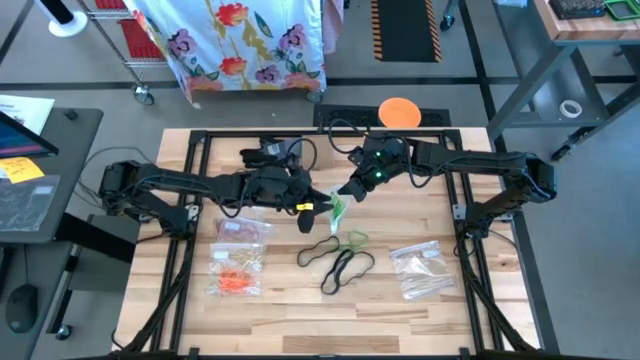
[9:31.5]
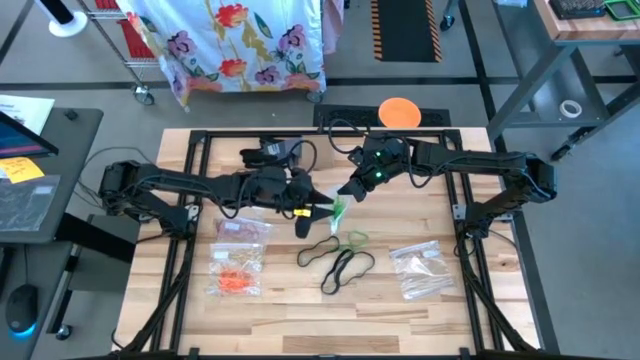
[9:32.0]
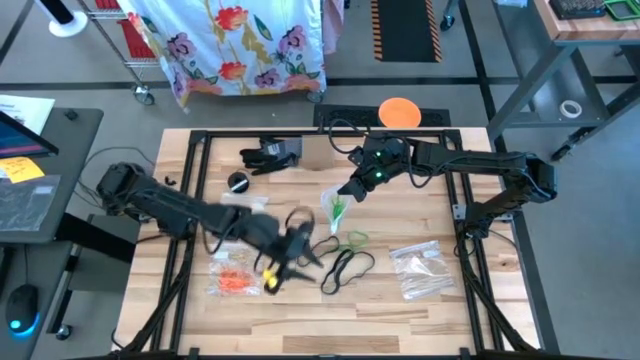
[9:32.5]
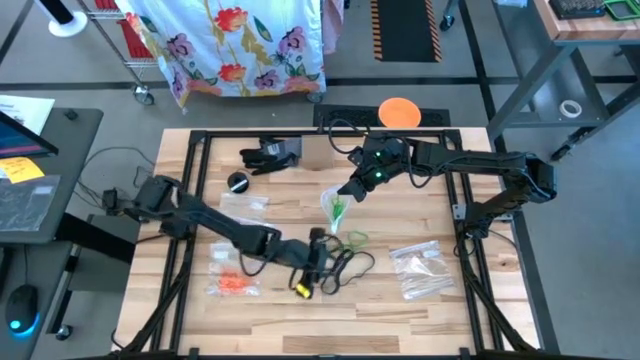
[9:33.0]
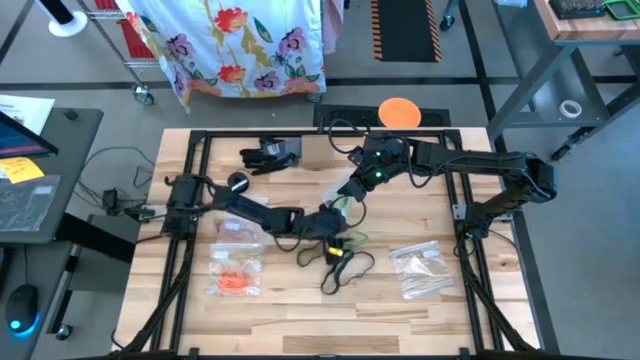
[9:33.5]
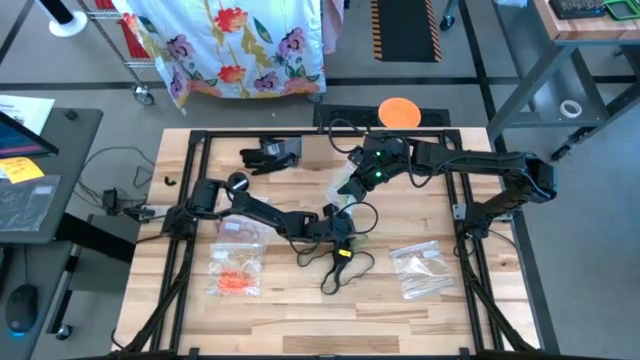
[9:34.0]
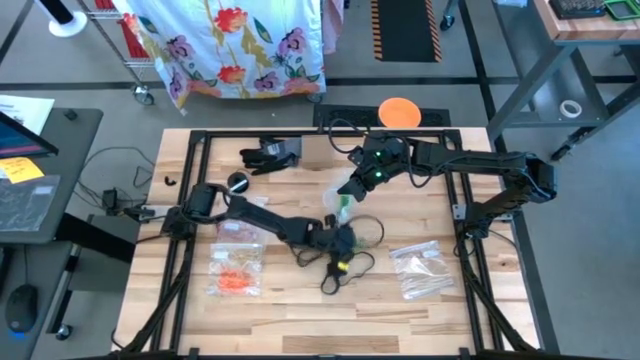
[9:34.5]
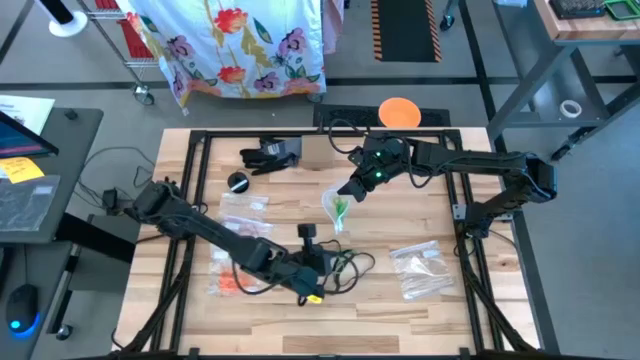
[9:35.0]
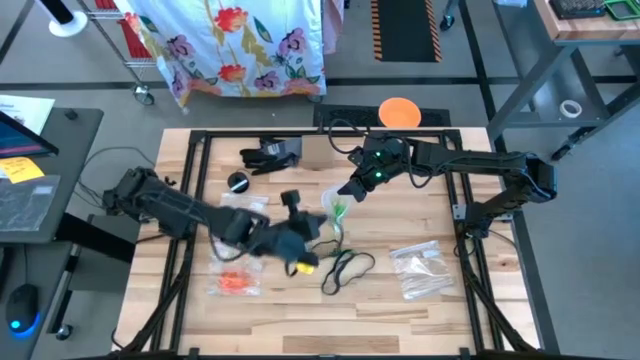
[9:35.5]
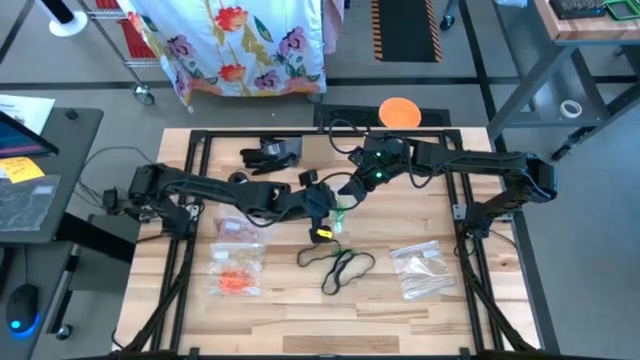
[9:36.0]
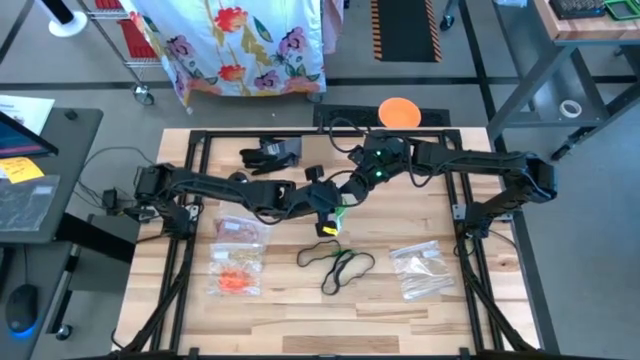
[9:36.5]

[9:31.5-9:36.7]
Task: Sort rubber bands
Put the green rubber band into the transparent zip bag

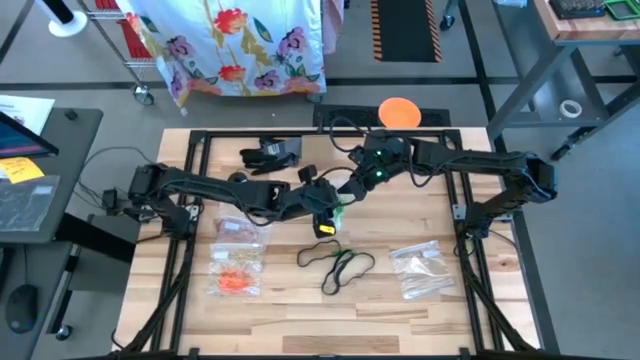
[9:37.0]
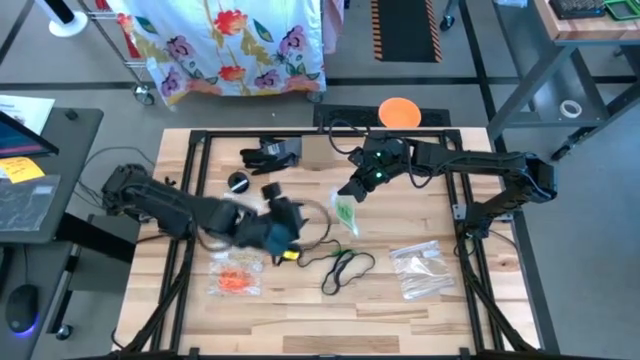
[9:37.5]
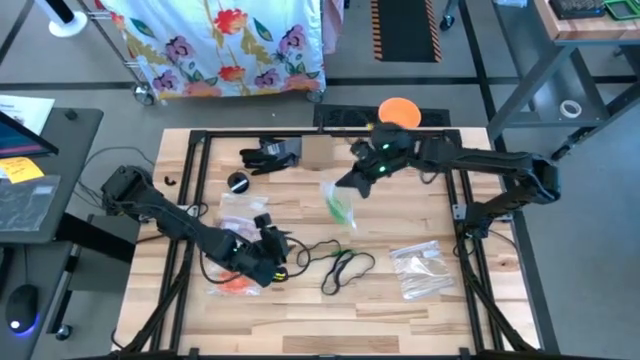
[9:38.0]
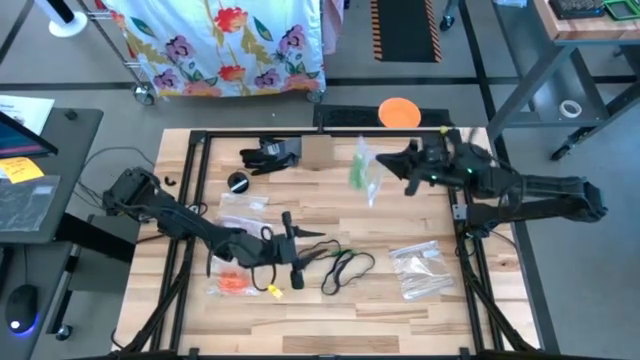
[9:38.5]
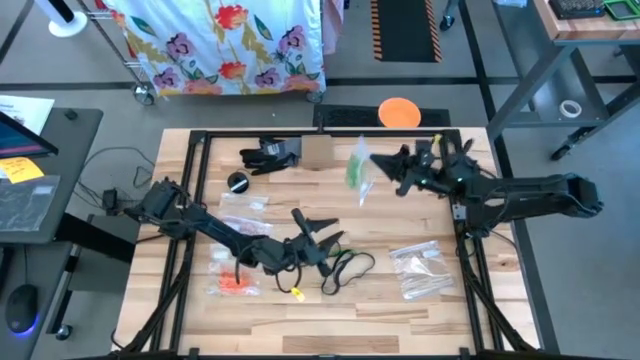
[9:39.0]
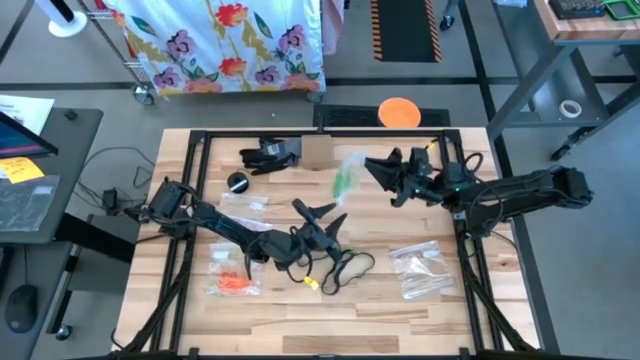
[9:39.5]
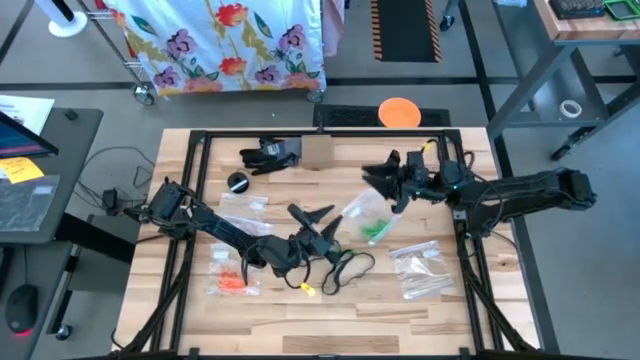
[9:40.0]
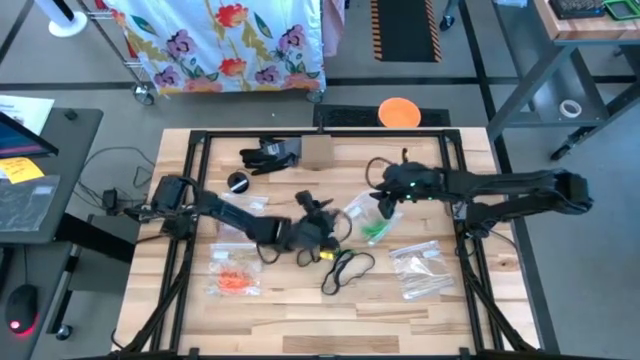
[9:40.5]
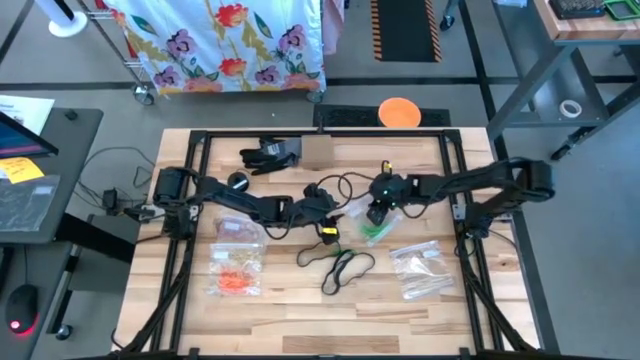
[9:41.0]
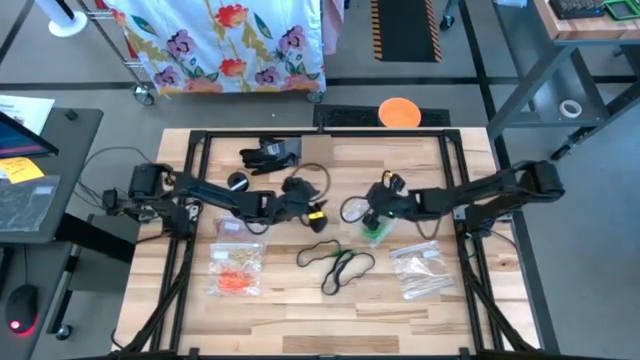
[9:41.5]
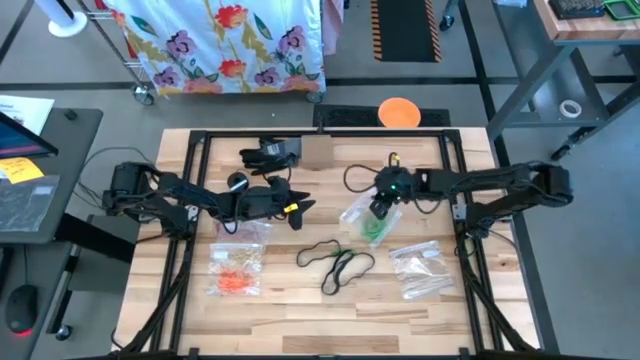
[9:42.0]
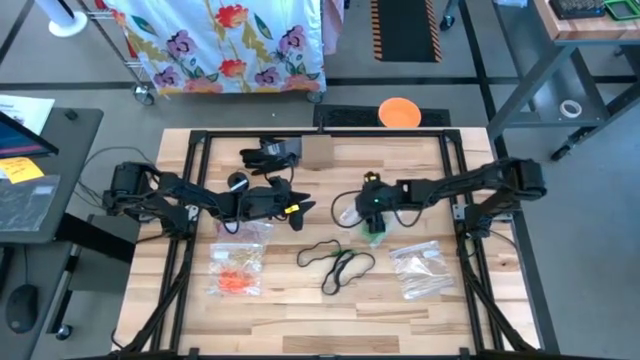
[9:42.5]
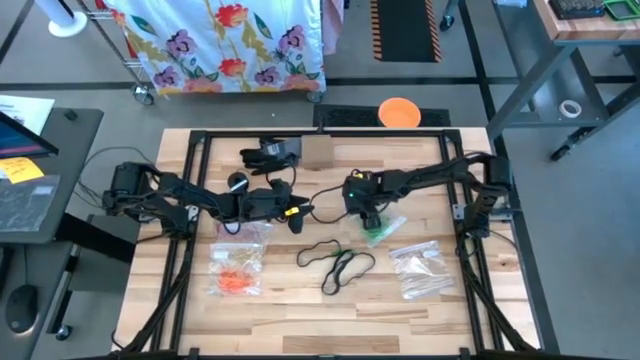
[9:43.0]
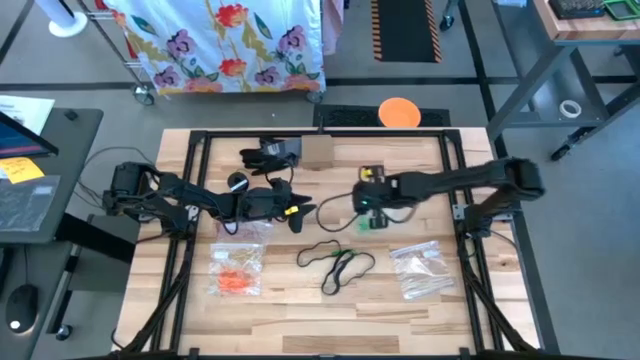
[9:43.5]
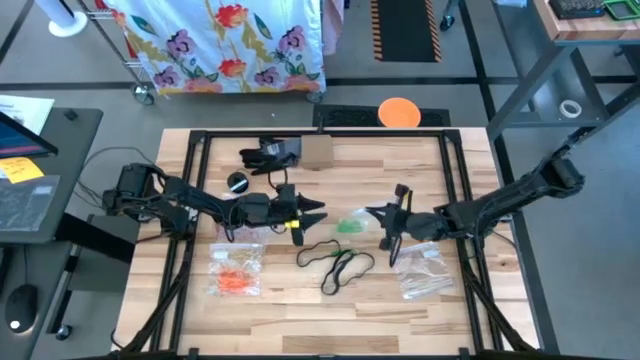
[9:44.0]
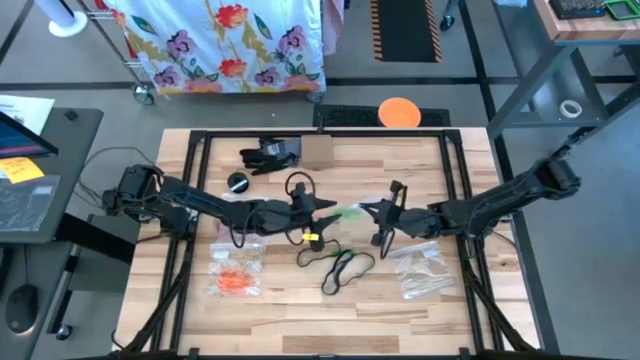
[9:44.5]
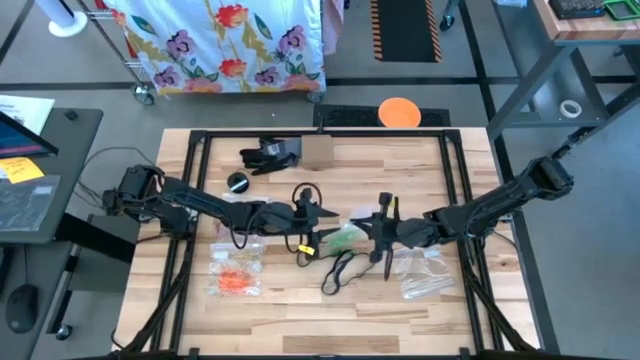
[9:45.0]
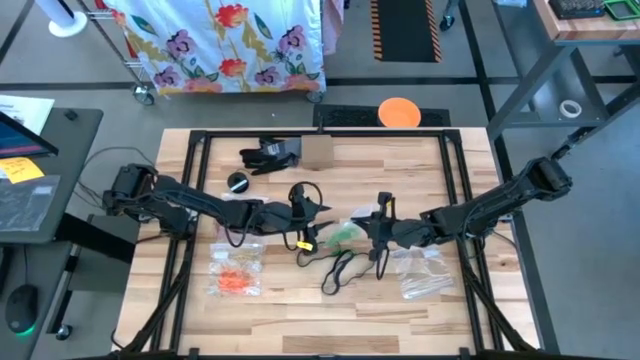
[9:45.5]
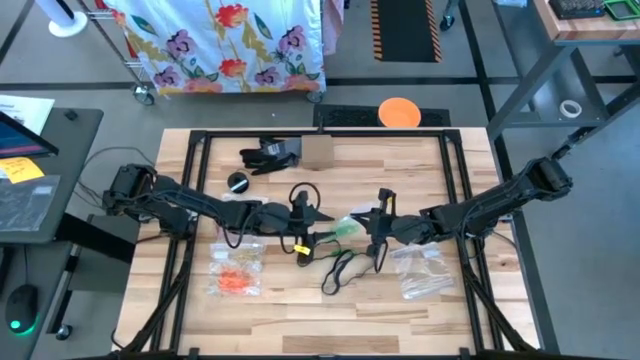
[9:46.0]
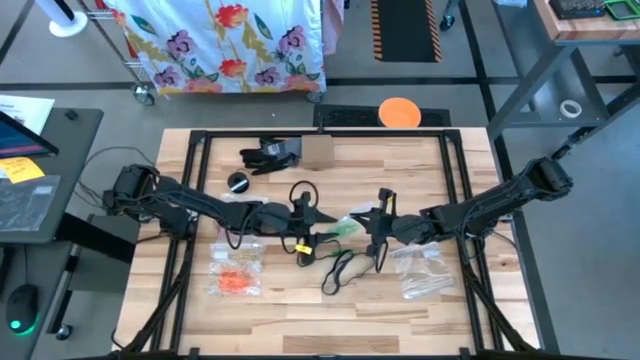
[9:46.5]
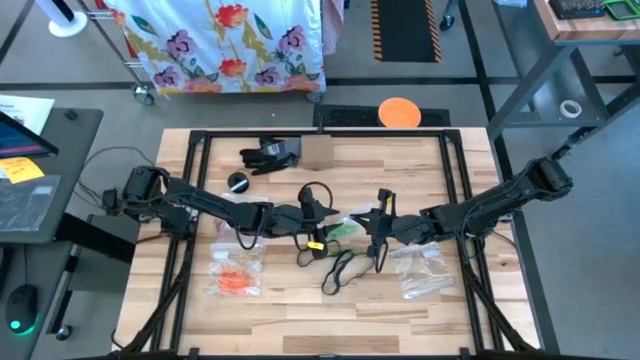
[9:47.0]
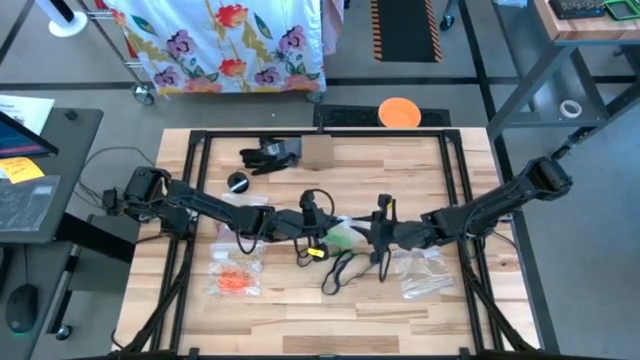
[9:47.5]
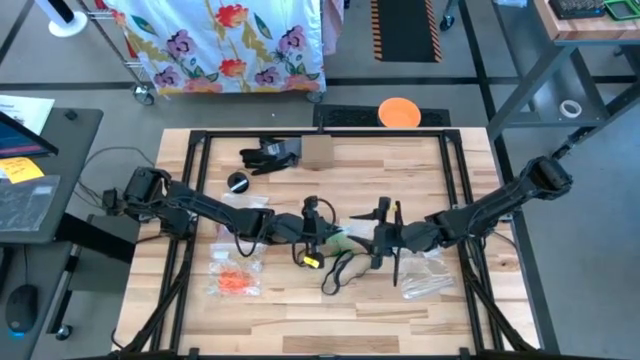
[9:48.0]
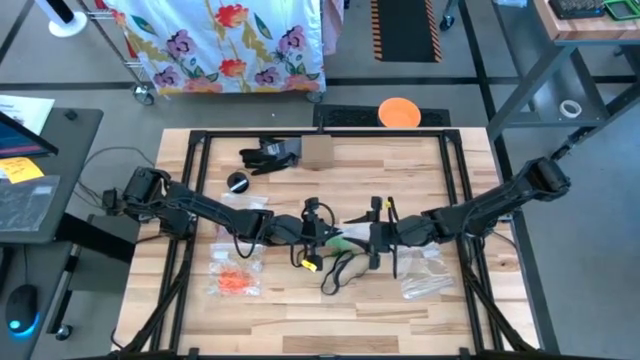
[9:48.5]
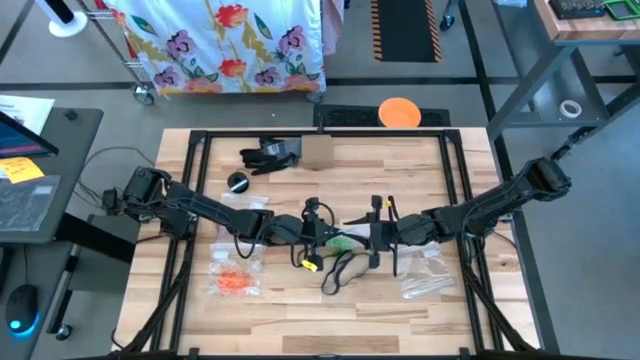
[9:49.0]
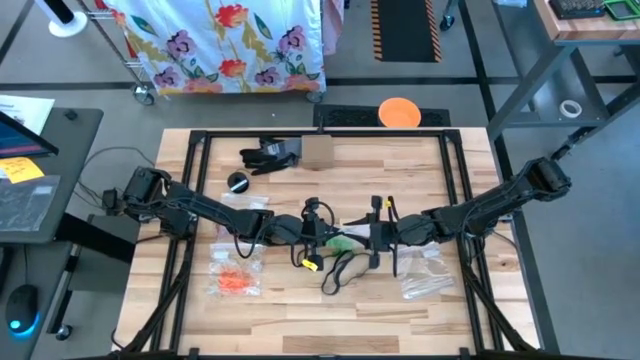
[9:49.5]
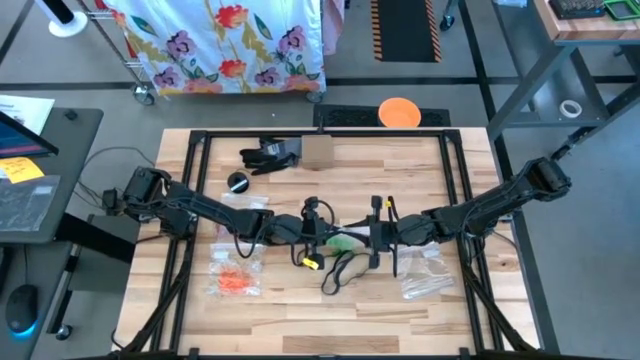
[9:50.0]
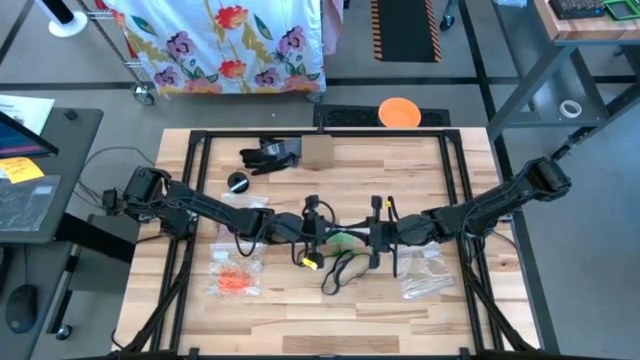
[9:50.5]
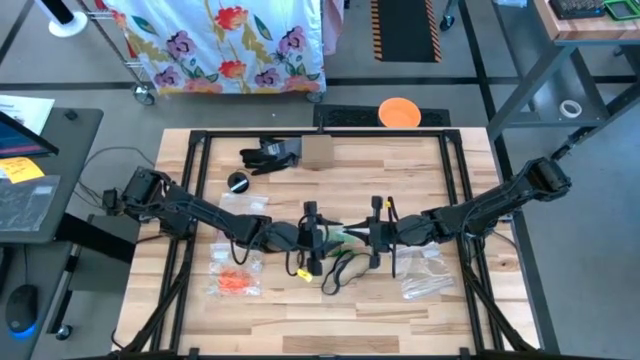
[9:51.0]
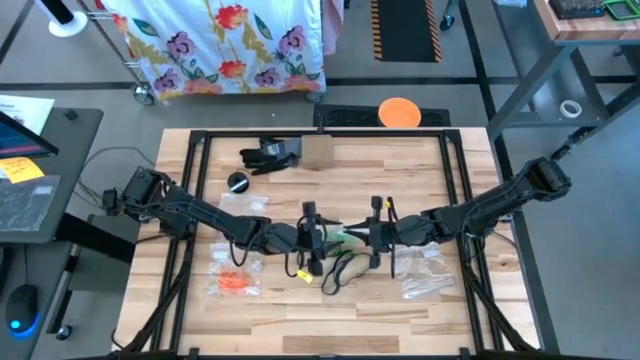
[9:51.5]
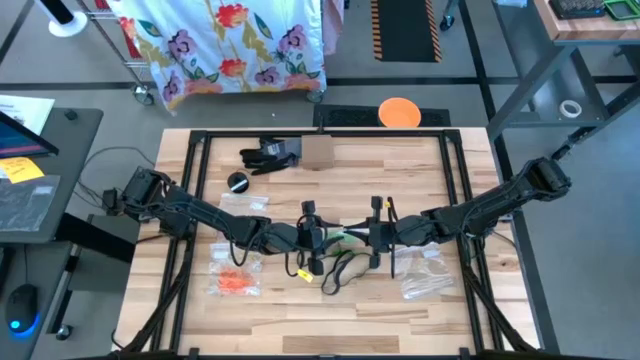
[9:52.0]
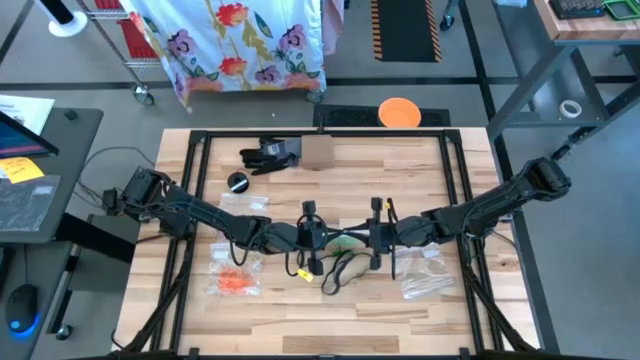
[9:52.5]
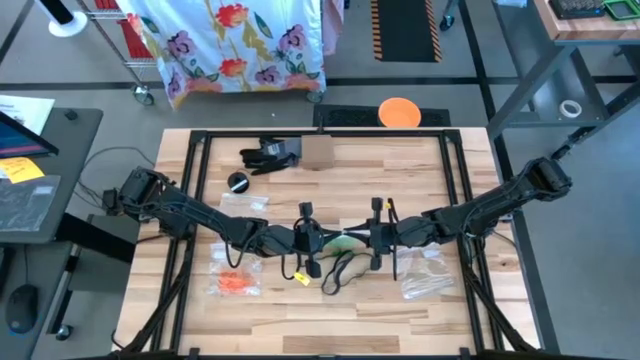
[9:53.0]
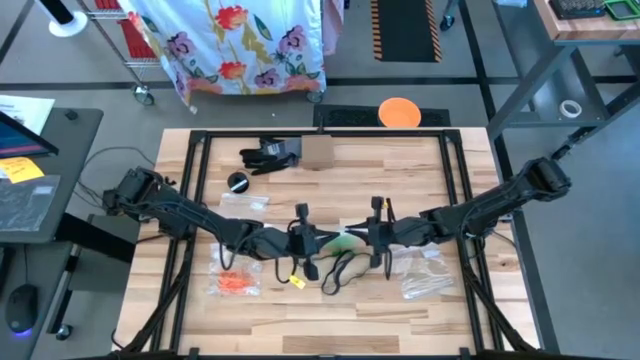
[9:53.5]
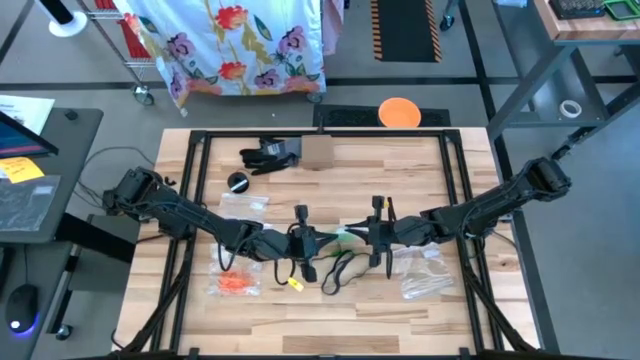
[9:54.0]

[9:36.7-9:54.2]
Close the transparent zip bag
